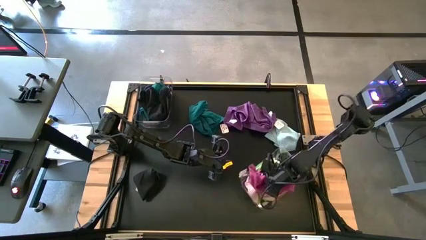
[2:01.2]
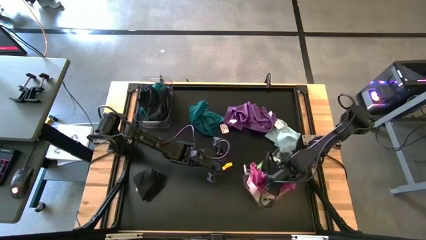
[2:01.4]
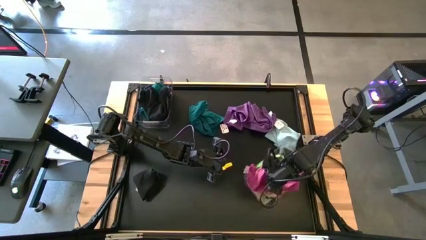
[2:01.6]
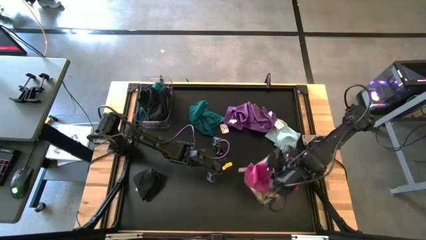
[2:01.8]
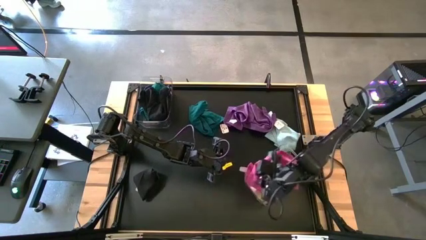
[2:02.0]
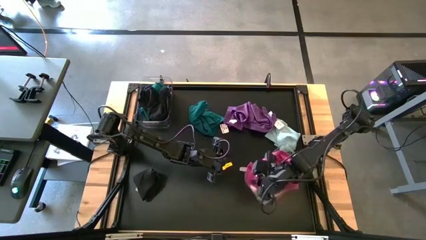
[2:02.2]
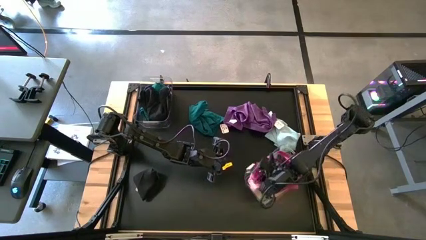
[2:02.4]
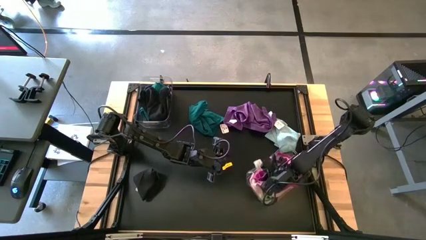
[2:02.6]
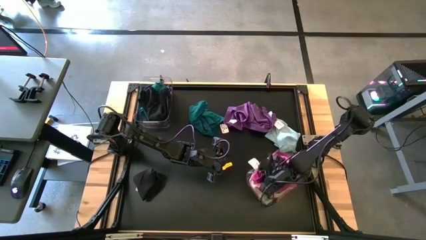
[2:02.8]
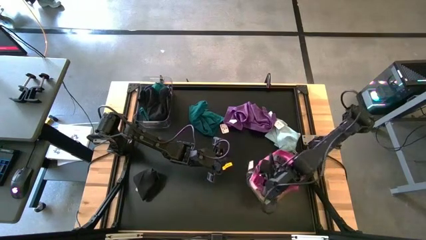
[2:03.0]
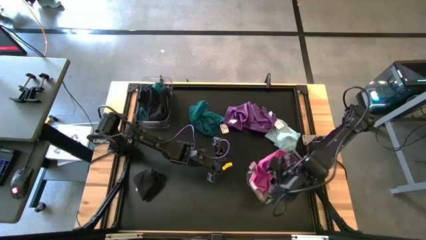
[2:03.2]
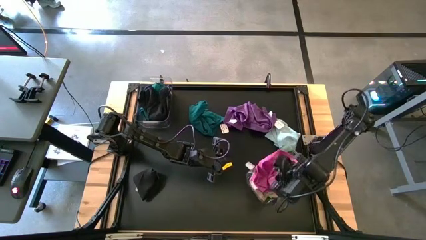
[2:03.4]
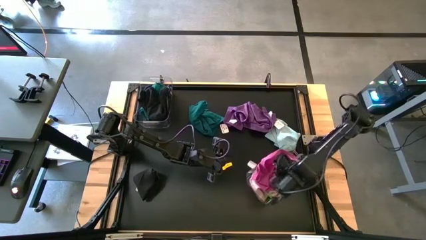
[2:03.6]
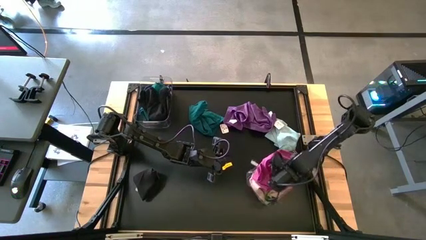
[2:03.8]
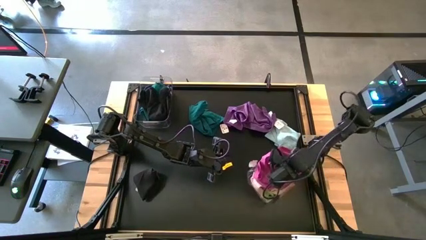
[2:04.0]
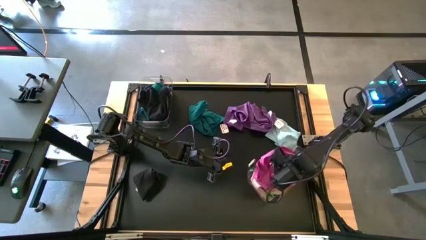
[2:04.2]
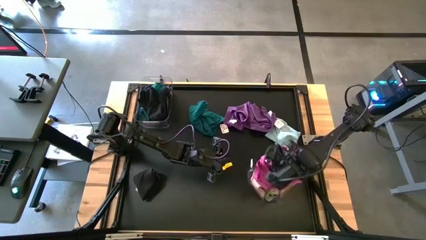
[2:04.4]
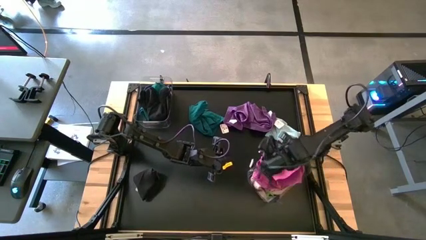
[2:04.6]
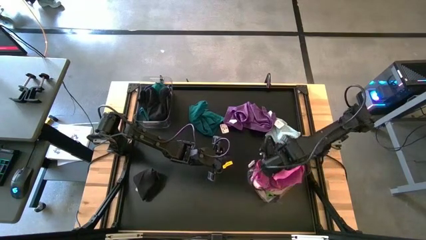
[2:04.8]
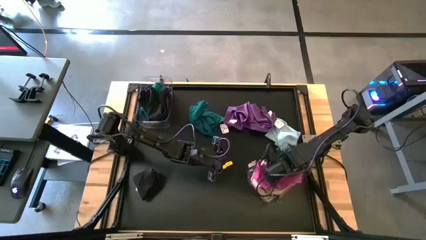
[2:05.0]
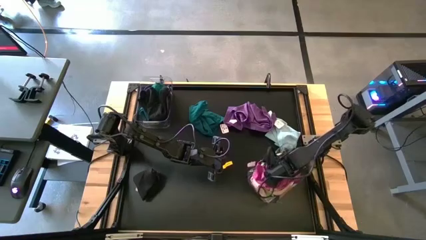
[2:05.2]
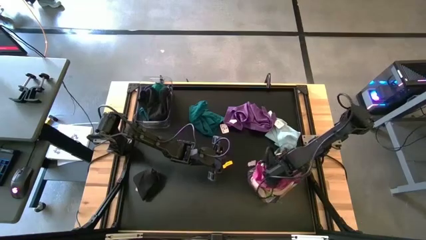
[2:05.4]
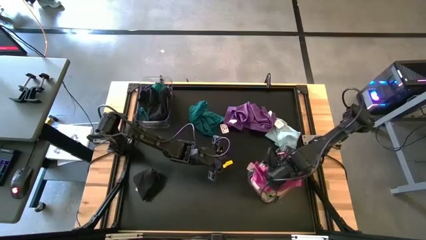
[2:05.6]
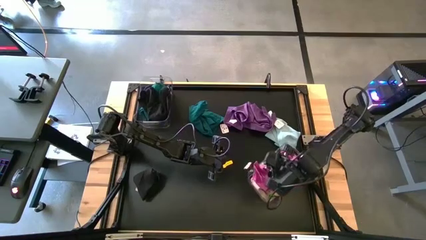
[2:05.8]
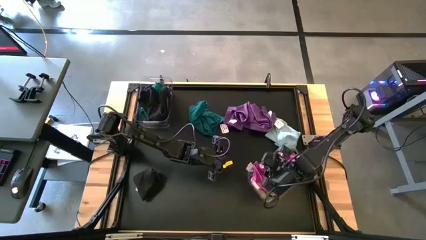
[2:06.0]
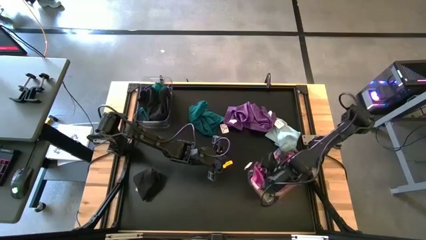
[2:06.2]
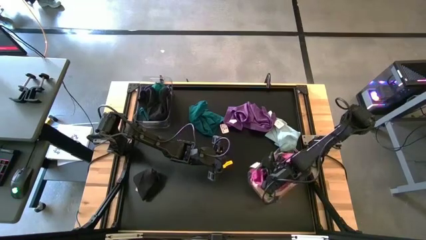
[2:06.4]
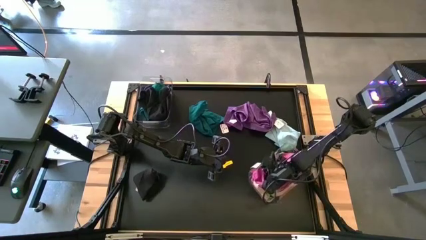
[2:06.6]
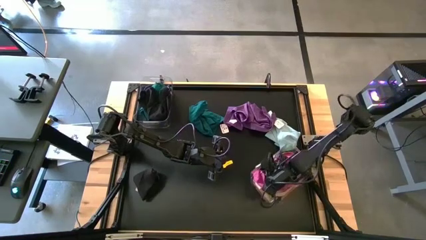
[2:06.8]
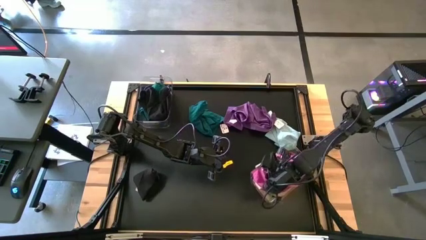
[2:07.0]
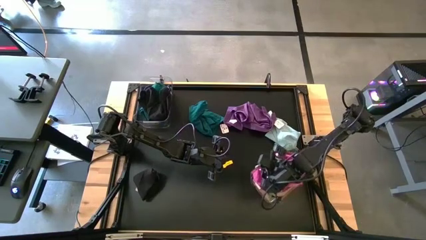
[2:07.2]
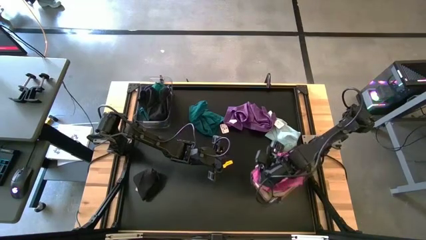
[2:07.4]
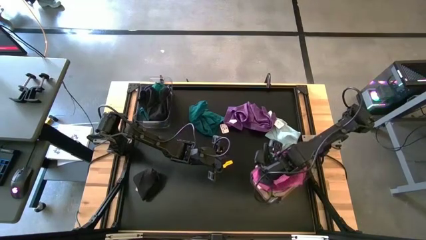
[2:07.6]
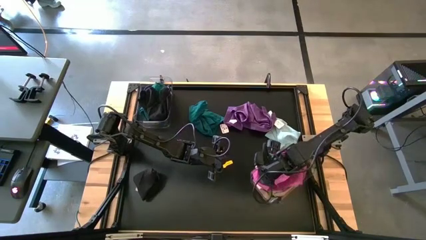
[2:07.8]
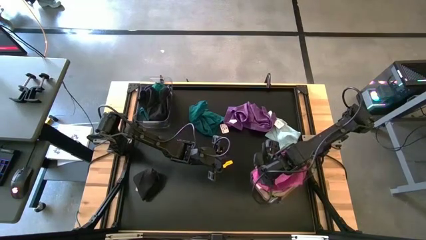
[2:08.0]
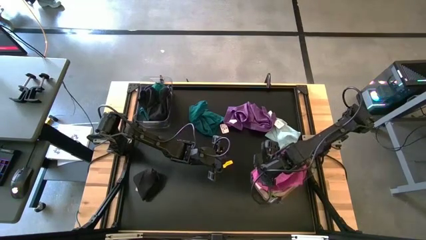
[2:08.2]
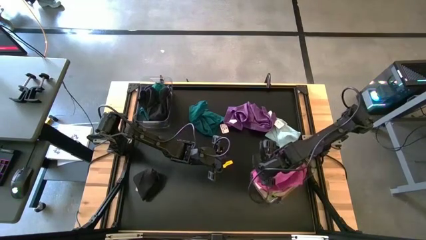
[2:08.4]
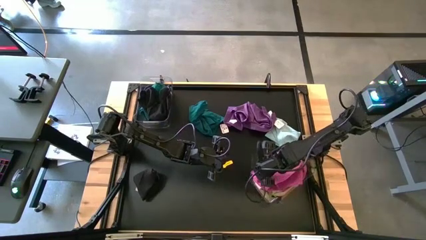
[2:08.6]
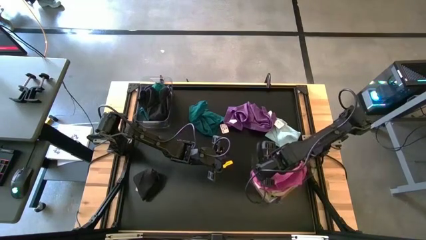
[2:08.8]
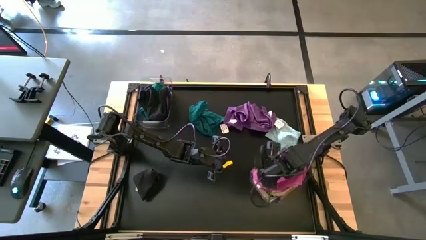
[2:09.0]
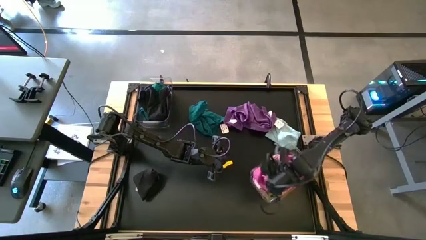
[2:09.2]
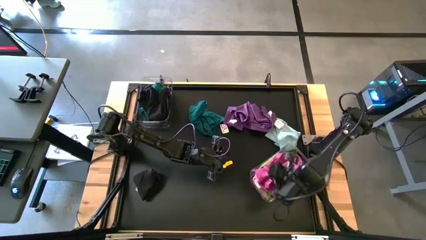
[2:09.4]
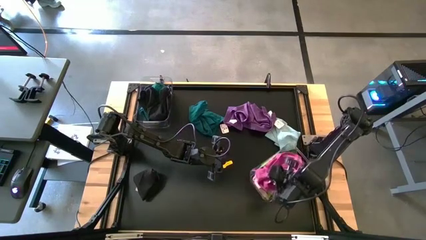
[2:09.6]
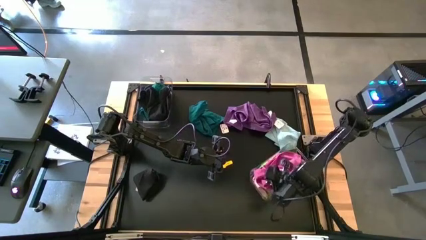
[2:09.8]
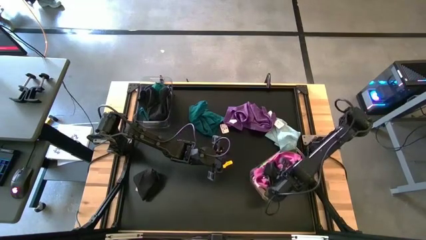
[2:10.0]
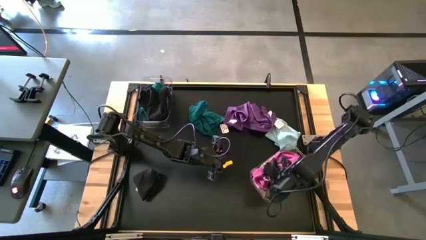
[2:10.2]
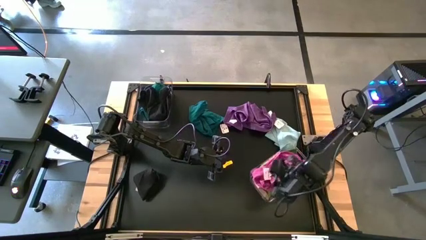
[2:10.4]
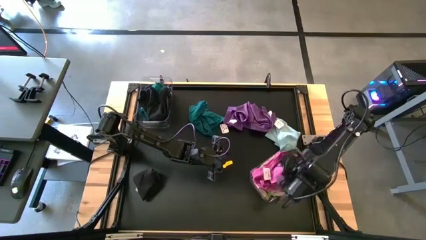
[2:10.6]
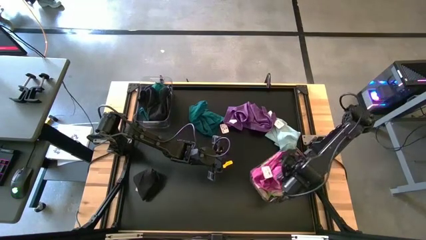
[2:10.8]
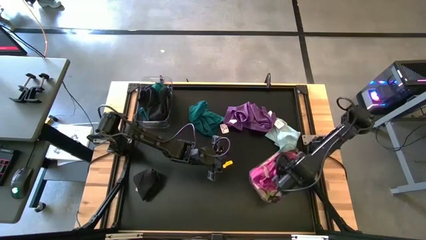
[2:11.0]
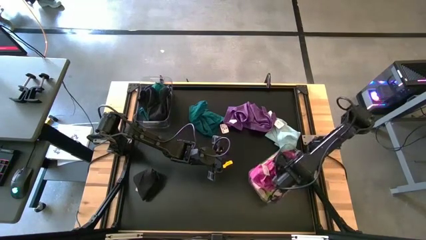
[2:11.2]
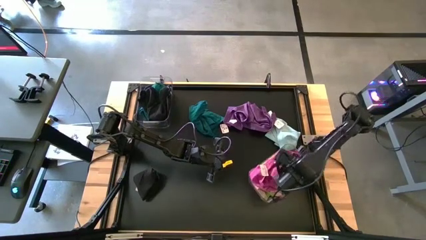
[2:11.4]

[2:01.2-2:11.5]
Task: Sort towels by color in basket
Put the pink towel into the bottom transparent bin

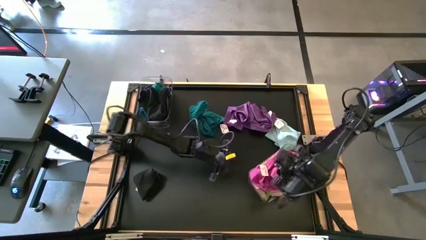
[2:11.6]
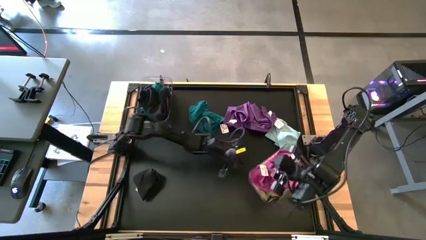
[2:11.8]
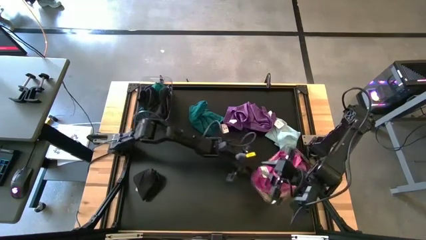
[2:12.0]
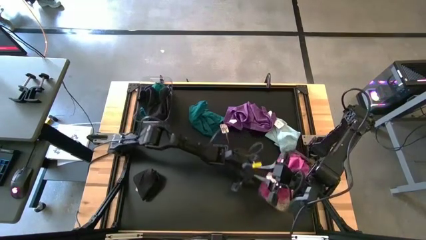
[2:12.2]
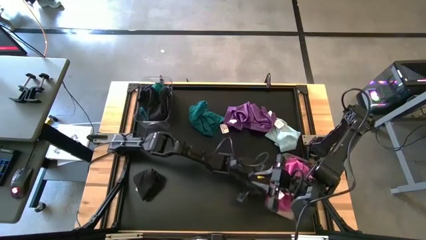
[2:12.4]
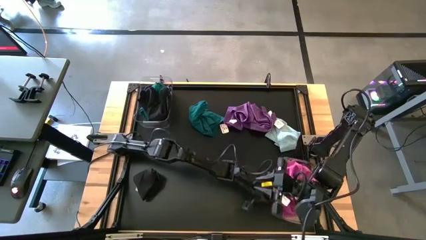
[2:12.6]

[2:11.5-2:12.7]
Adjust the bottom transparent bin

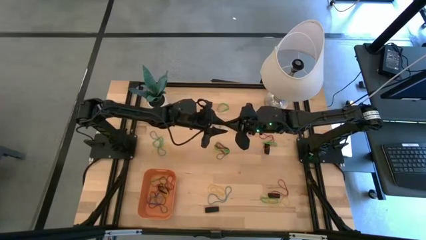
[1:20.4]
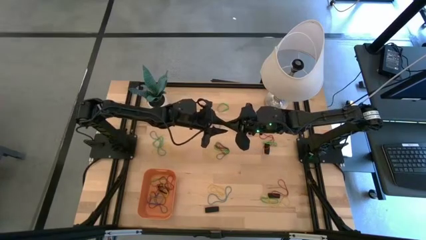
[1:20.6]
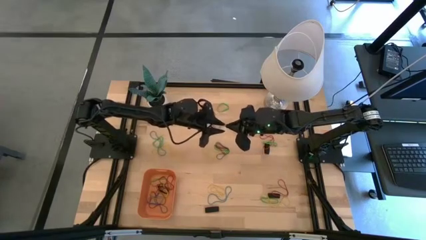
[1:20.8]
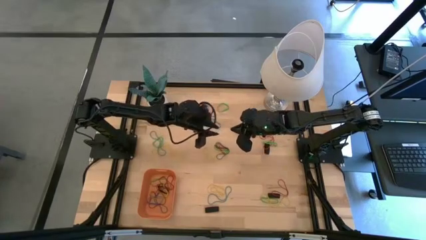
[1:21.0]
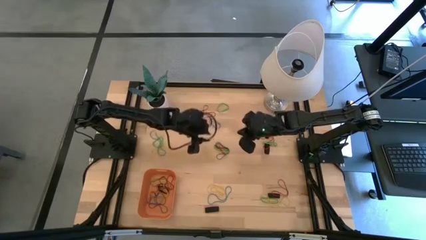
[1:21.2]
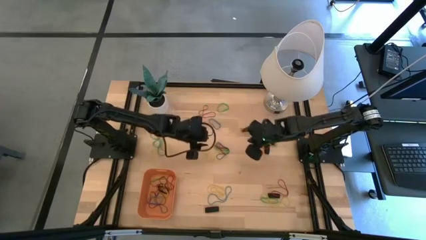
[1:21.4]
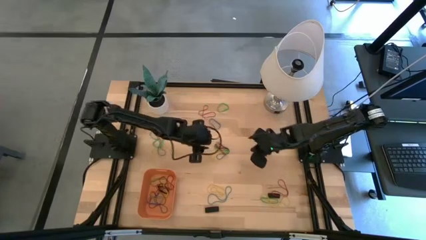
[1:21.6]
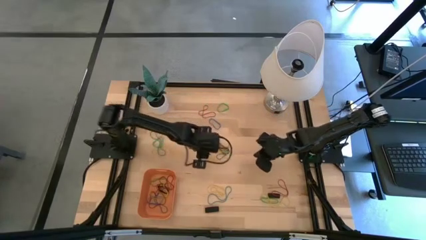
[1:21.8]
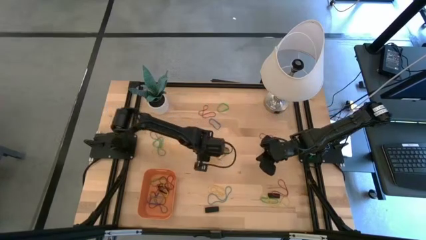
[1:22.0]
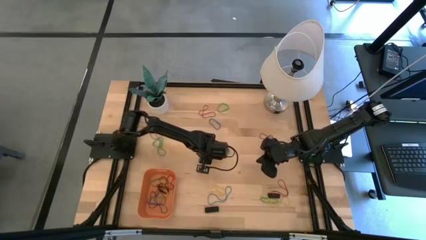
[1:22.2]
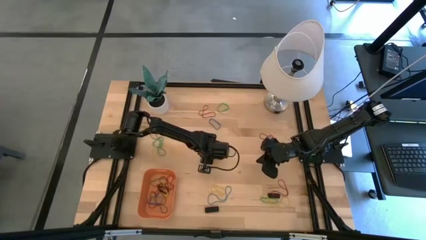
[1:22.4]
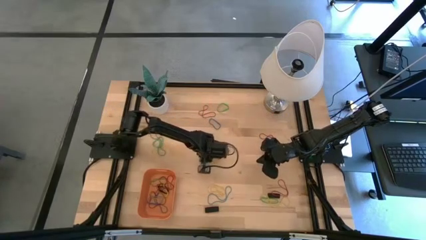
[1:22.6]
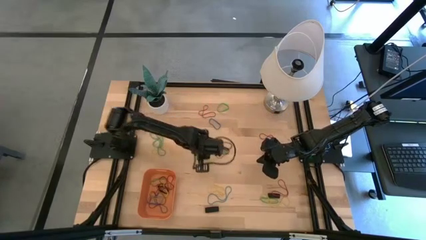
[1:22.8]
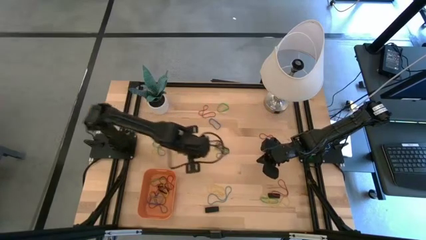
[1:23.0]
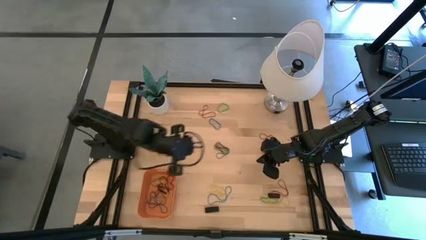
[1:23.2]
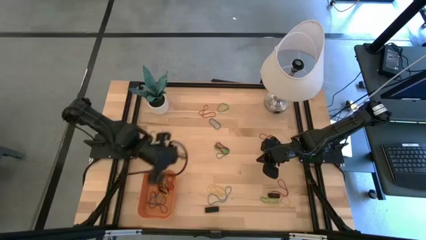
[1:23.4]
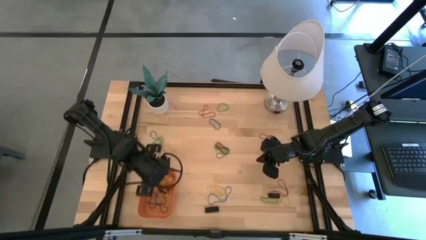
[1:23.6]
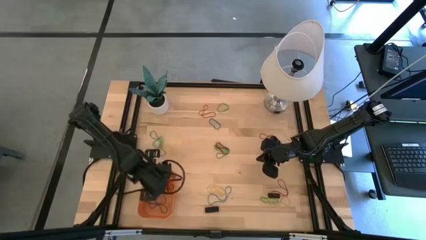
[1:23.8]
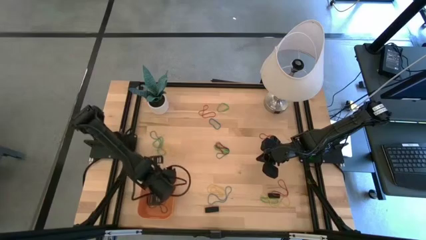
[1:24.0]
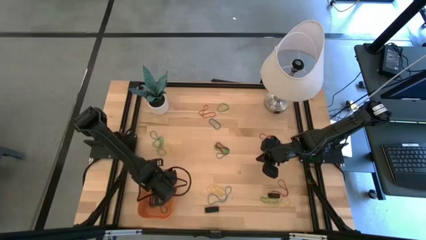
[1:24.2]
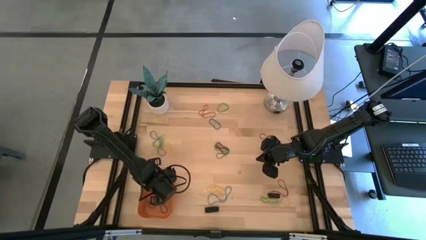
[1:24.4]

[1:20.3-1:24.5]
Task: Pick and place rubber bands into bin
Put the yellow rubber band into the orange bin

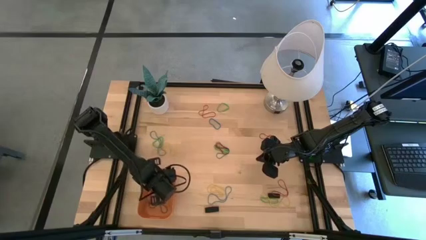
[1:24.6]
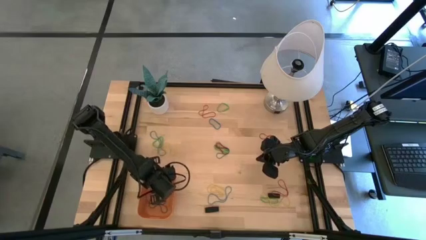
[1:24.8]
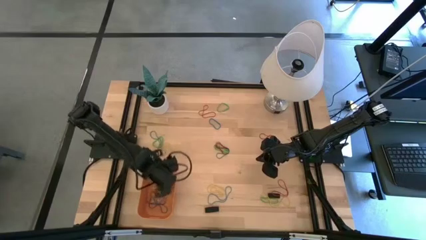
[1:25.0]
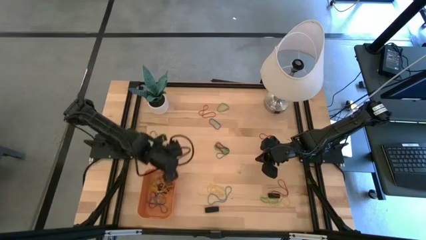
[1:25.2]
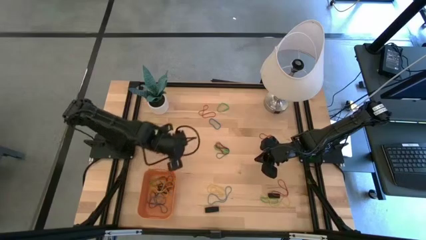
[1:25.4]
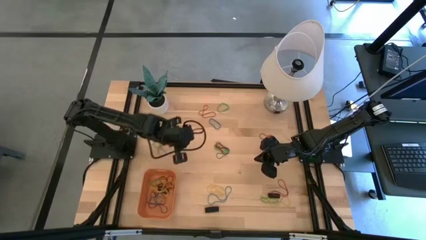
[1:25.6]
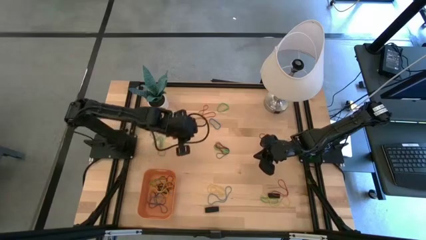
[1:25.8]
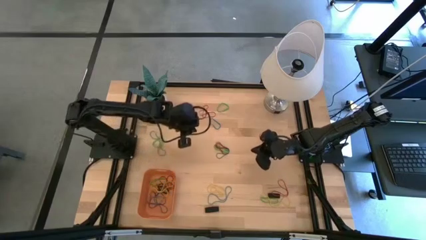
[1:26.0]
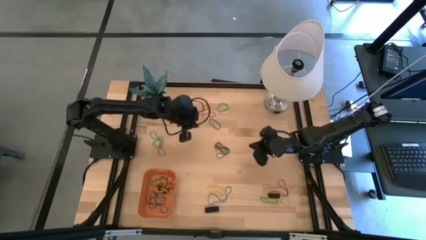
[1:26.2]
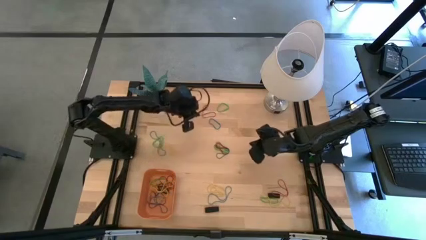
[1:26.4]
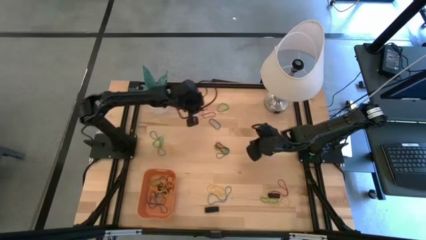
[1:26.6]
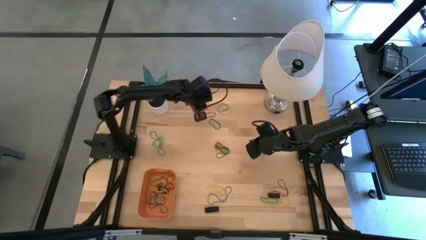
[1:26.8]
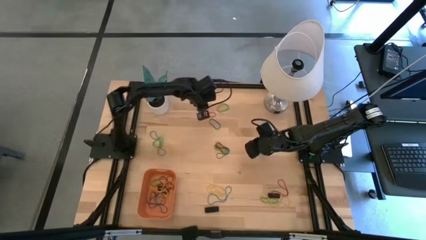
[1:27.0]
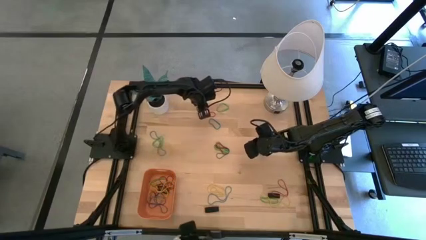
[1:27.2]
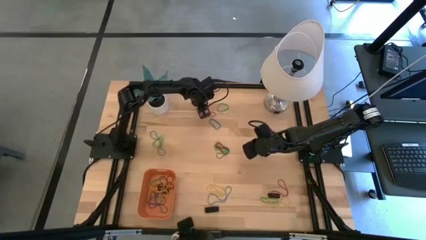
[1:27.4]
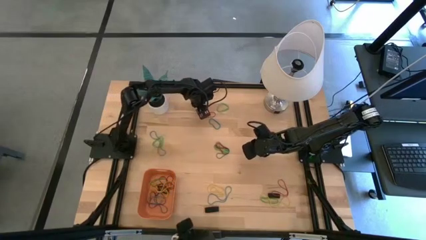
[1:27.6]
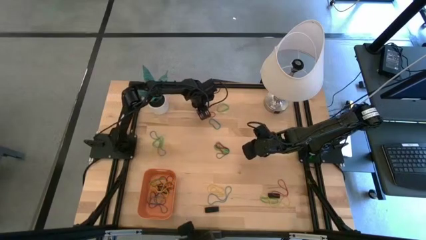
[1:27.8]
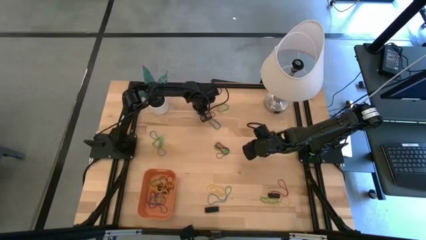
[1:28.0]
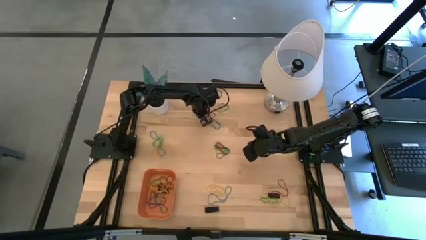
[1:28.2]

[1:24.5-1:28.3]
Put the red rubber band into the orange bin
